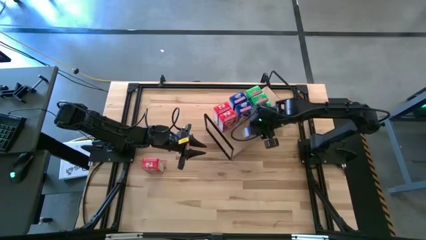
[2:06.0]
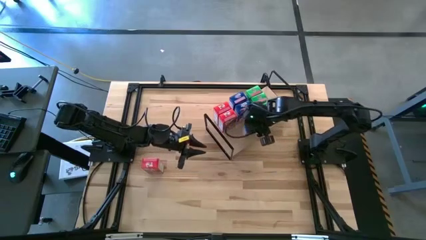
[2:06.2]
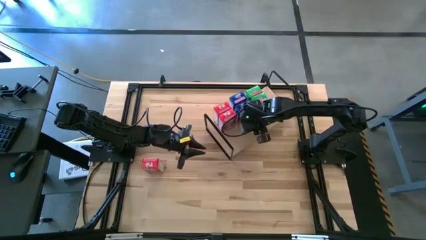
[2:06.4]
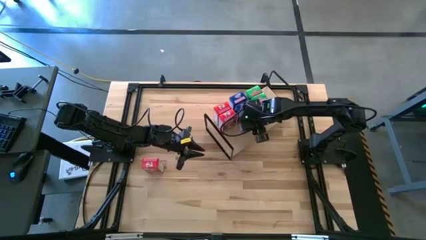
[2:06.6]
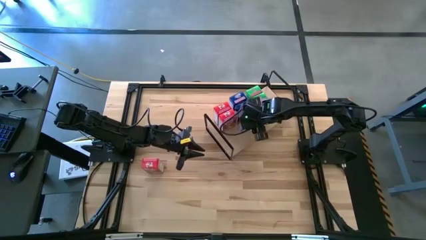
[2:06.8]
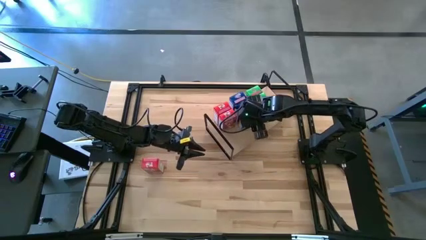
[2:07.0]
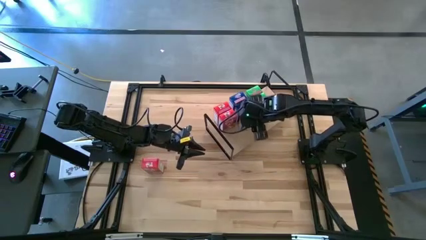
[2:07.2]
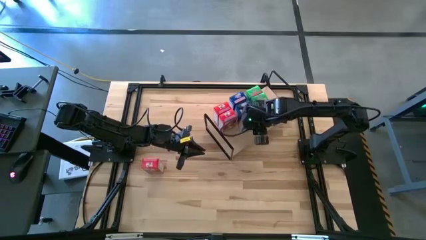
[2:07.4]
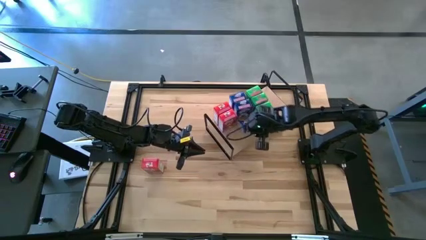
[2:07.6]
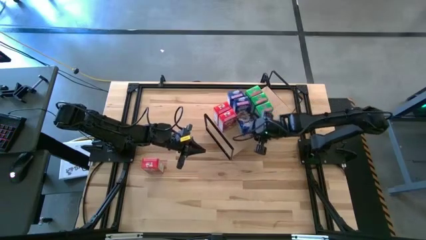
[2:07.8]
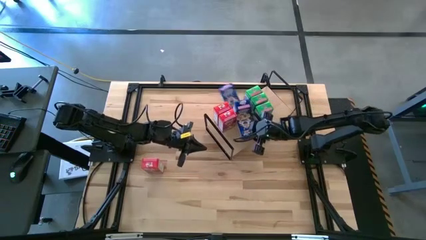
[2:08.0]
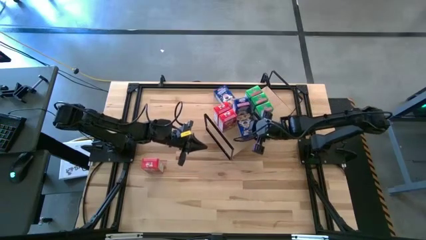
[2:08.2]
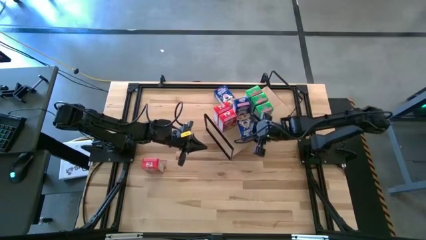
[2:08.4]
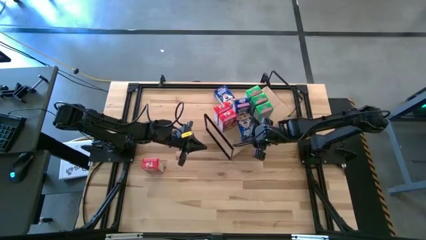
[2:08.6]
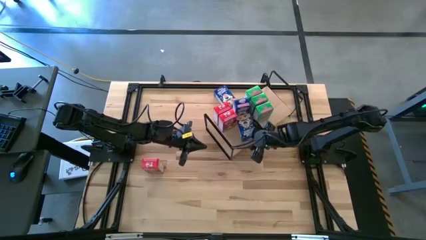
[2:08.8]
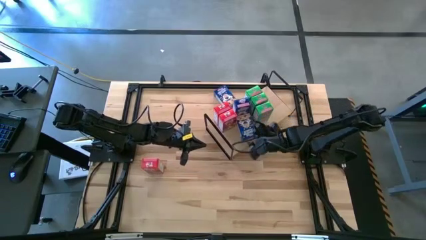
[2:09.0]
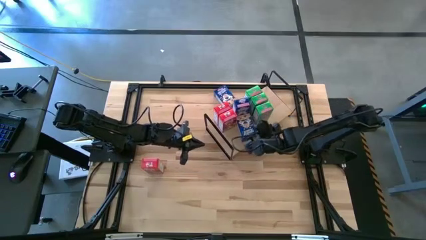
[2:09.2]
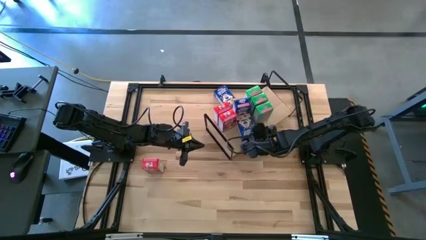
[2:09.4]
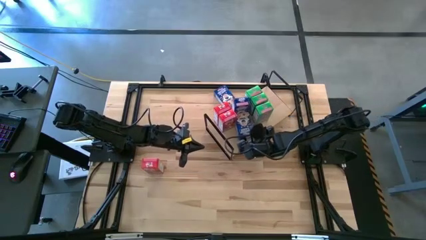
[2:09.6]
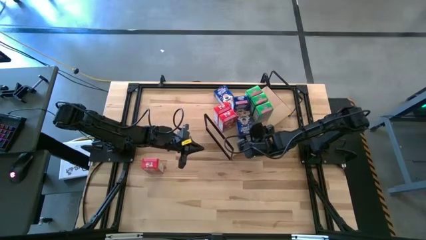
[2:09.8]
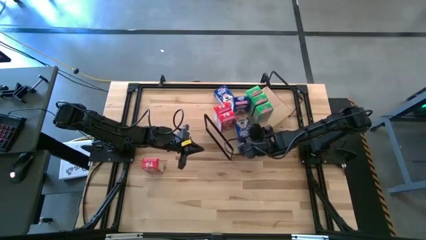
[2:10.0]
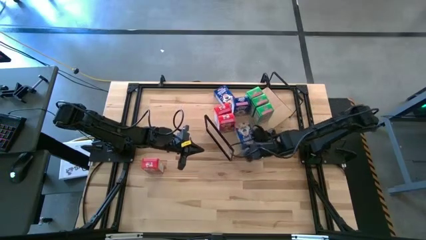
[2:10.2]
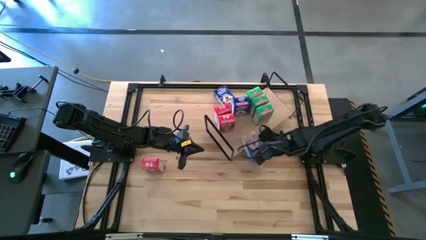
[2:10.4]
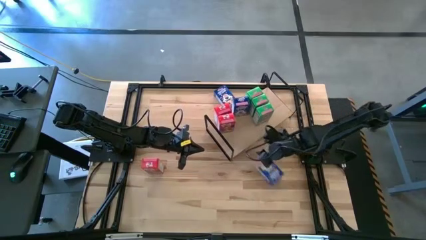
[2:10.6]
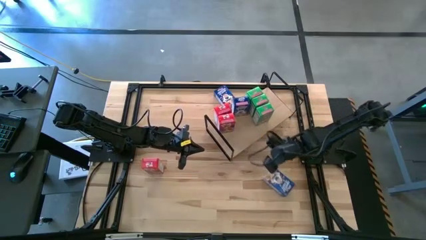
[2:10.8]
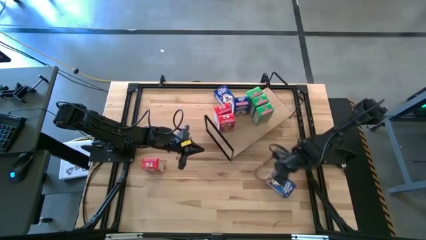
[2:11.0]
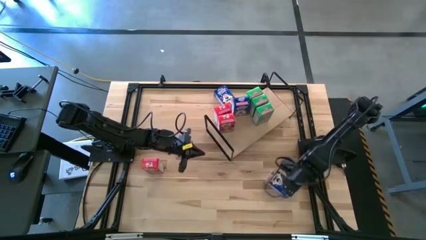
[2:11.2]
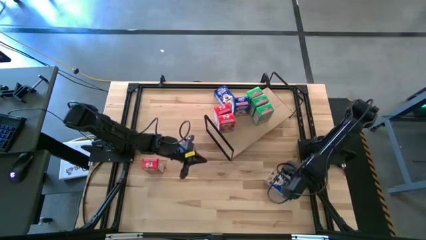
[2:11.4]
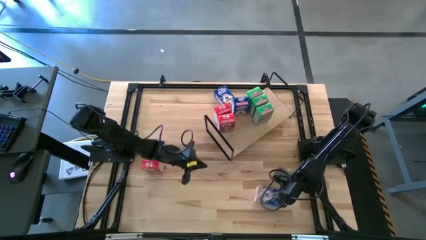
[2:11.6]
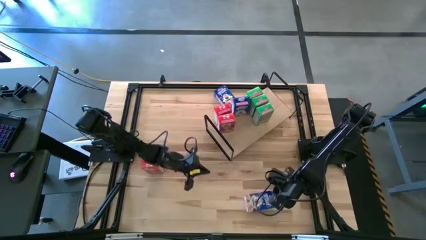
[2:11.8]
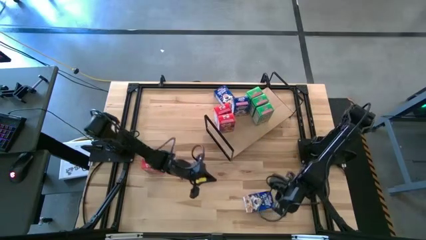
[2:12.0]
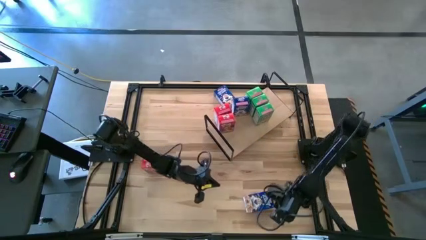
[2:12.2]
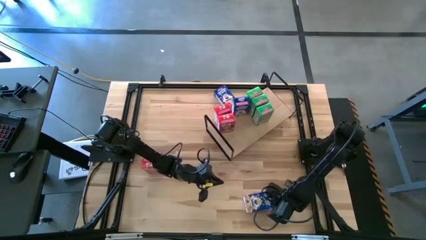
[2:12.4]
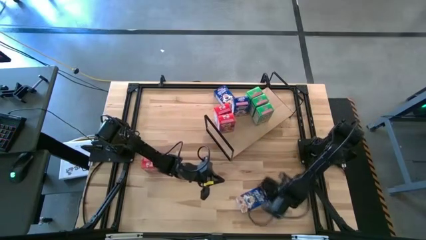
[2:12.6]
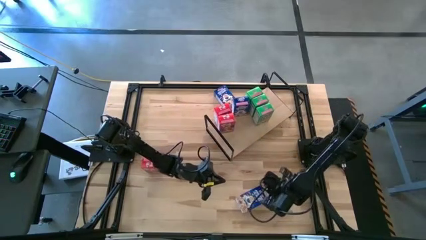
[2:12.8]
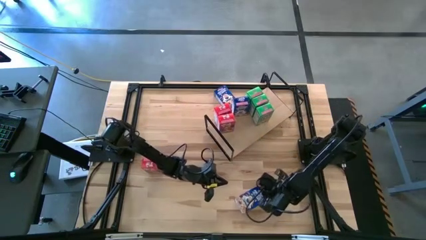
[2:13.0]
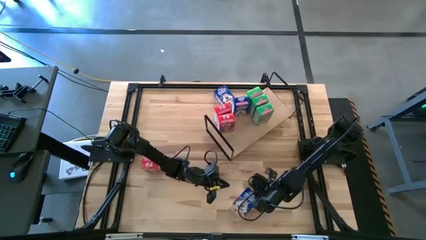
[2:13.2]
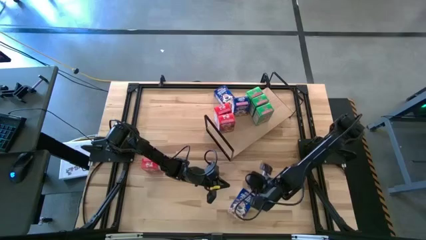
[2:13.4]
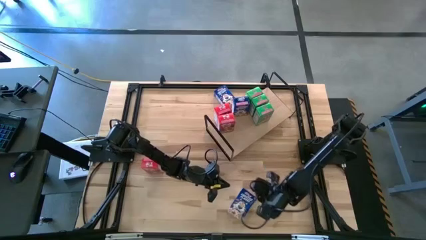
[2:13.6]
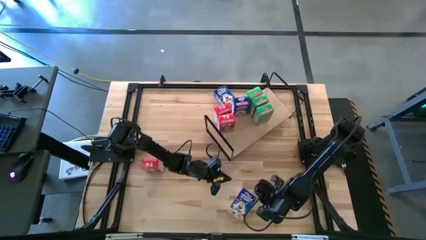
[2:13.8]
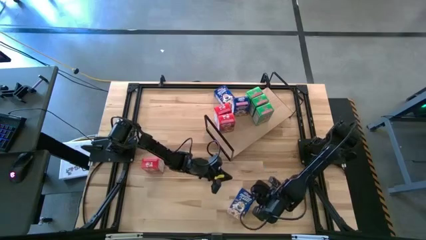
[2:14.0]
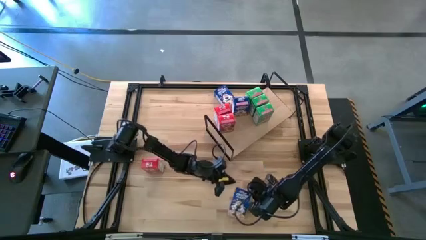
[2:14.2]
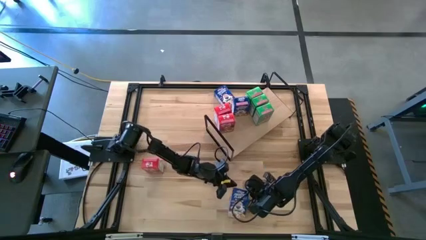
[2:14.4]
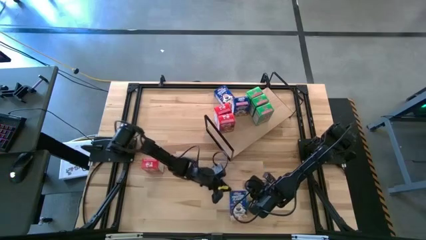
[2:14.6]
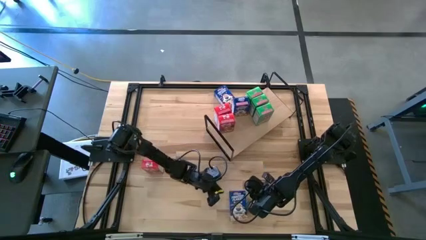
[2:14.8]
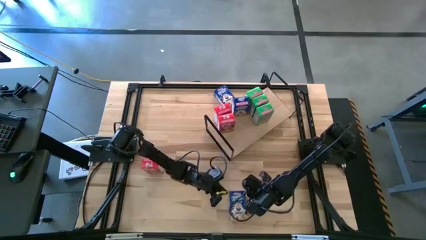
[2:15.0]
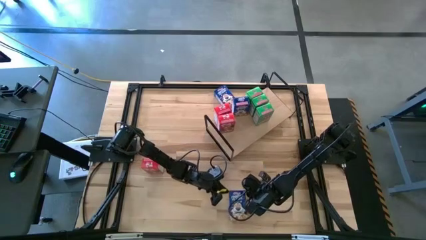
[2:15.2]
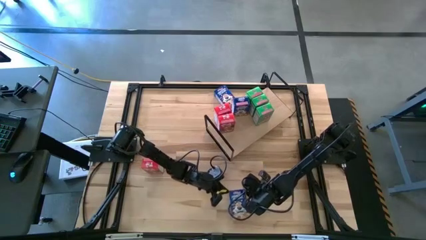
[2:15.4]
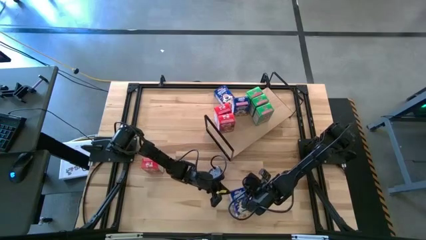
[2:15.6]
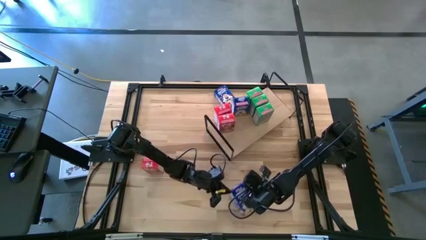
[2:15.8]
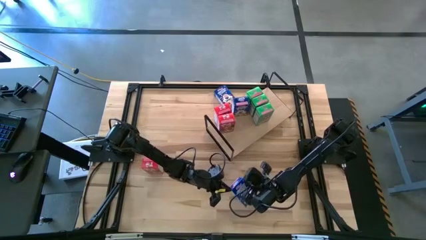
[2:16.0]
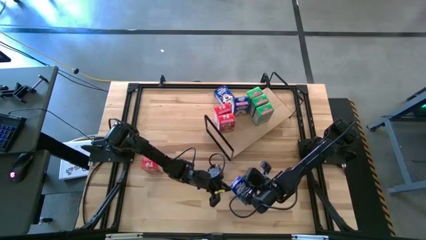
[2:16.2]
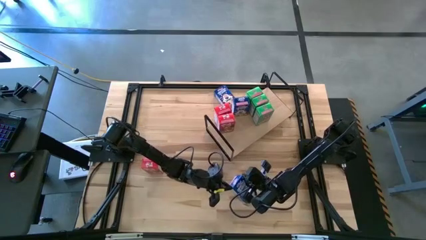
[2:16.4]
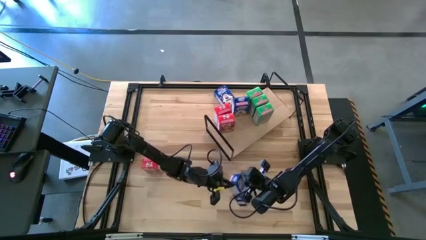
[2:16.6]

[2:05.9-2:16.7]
Task: Stack cereal on shelf
Put the blue cereal box on the shelf aligned with the other blue cereal boxes

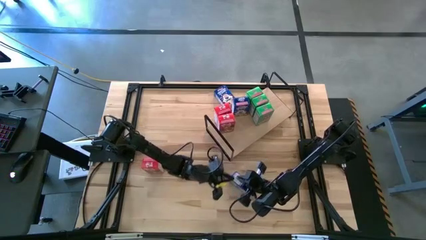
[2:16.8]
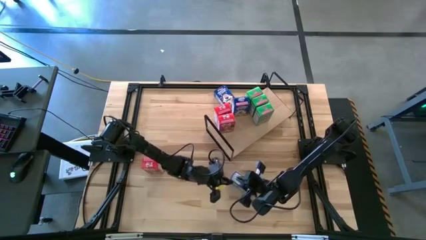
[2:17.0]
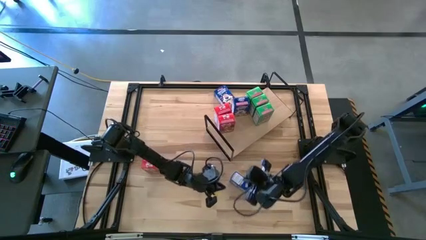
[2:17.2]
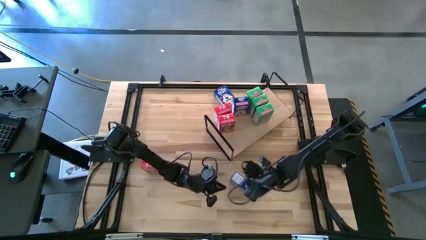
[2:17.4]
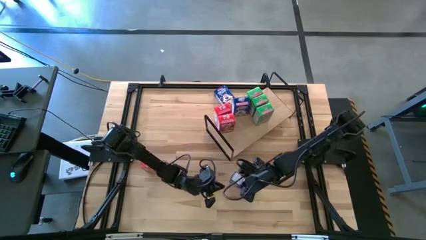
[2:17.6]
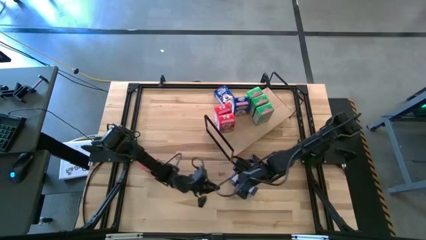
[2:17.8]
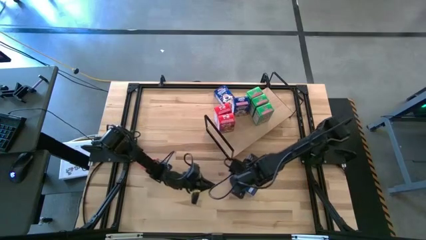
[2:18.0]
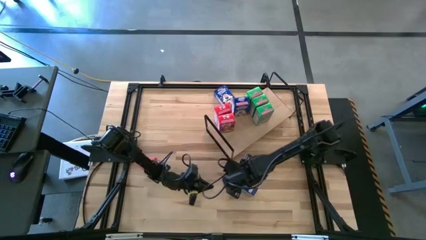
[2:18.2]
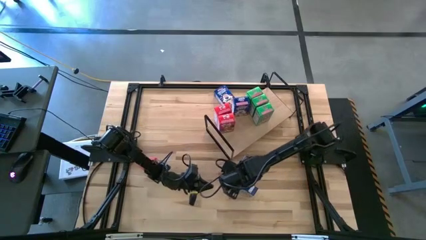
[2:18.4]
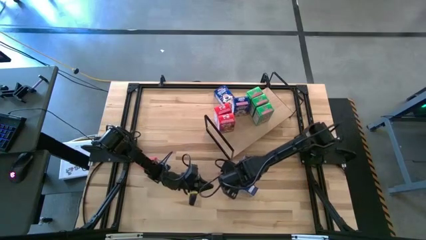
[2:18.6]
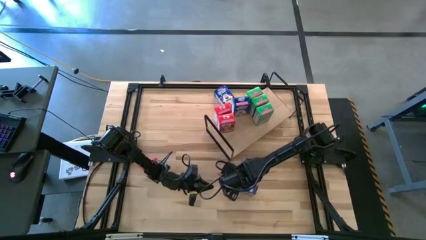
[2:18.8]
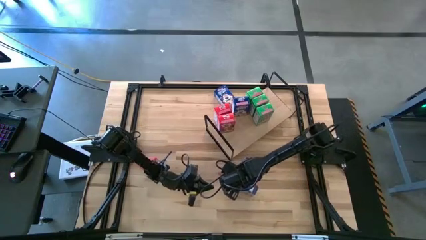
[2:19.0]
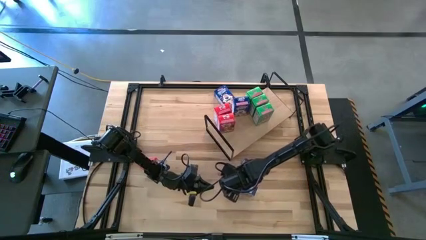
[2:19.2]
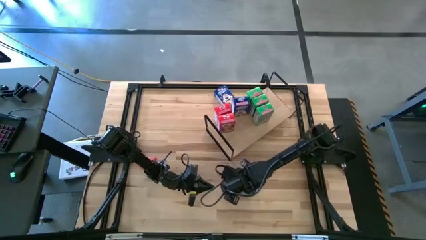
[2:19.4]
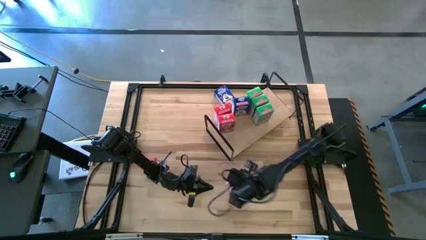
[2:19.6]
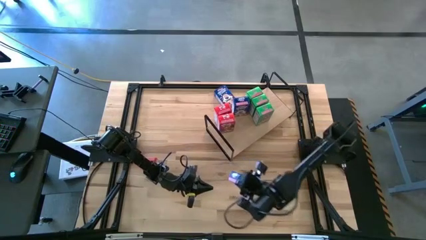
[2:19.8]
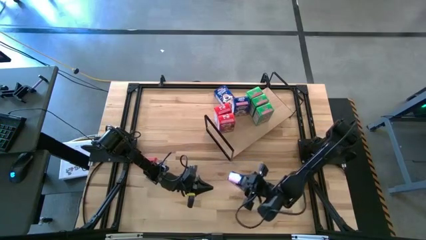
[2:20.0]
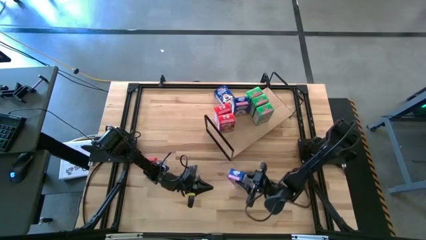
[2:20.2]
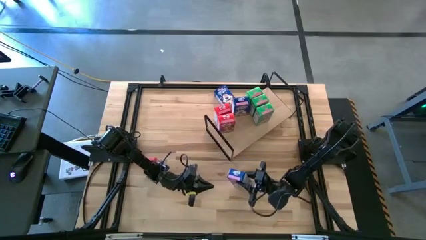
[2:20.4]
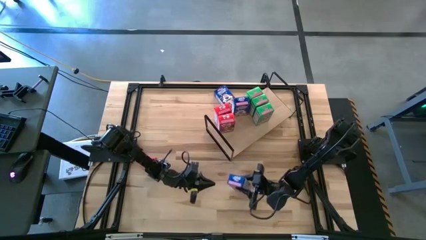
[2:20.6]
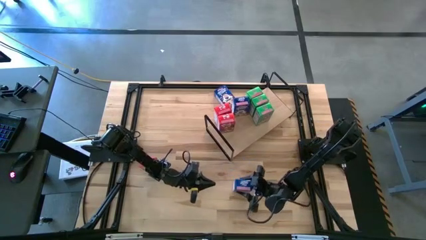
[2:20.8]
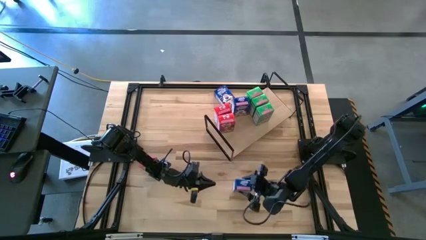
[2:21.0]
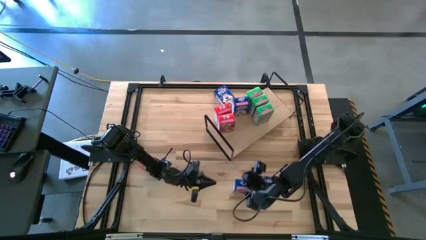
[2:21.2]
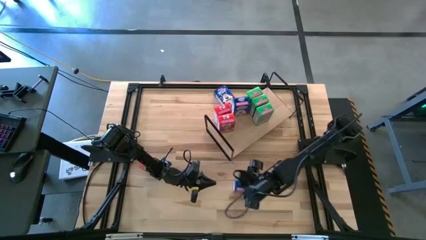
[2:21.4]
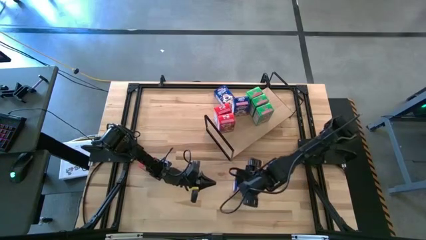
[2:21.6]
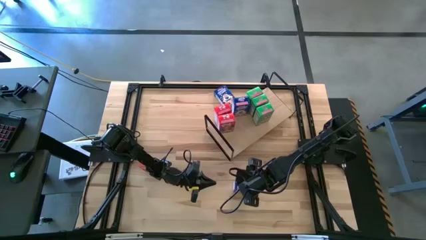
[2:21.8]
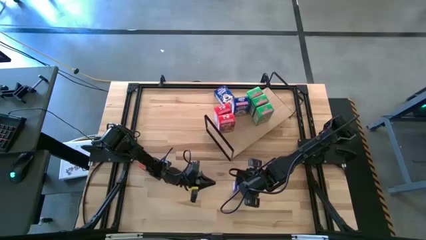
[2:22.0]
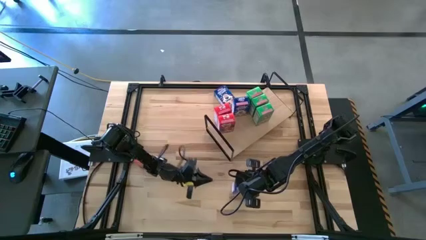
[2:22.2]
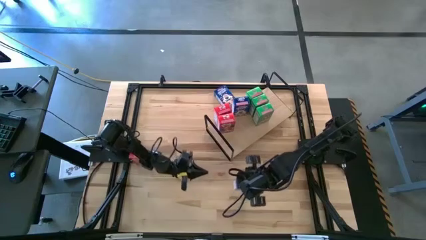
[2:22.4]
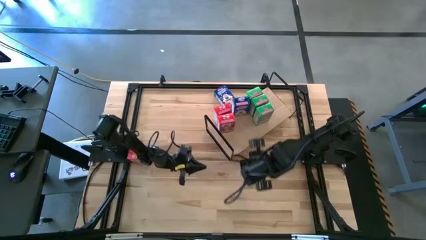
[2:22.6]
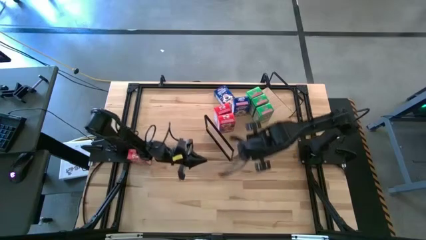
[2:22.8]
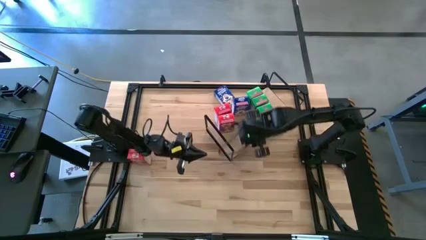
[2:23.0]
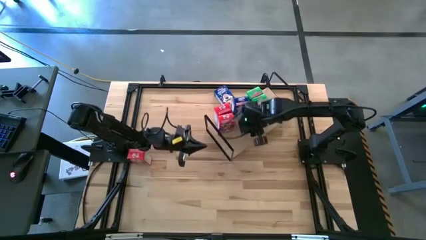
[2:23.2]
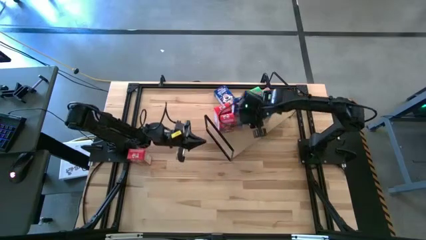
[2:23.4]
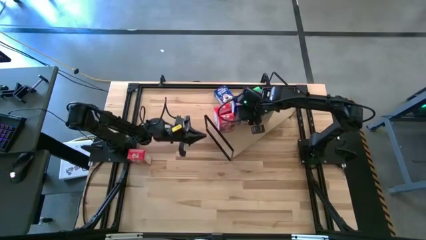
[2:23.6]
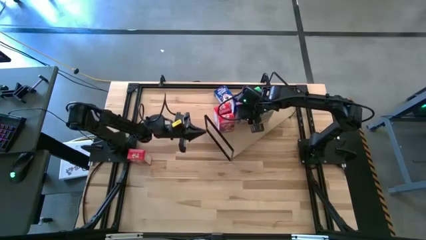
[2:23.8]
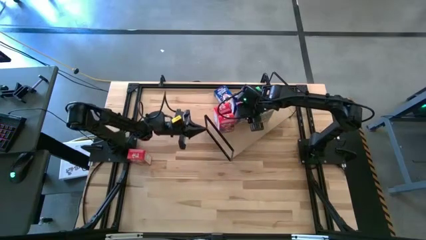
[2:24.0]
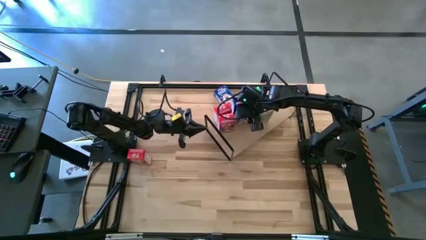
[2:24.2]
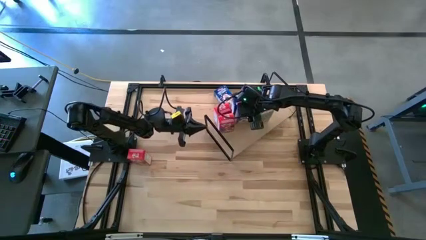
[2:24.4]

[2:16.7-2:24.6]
Put the bottom blue cereal box on the shelf aligned with the other blue cereal boxes
